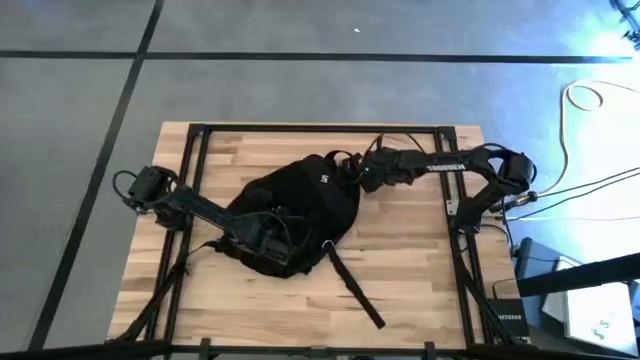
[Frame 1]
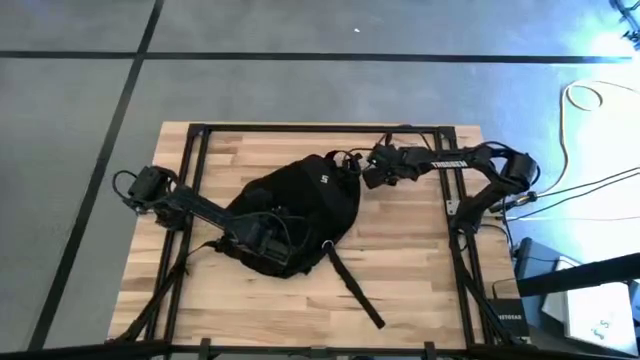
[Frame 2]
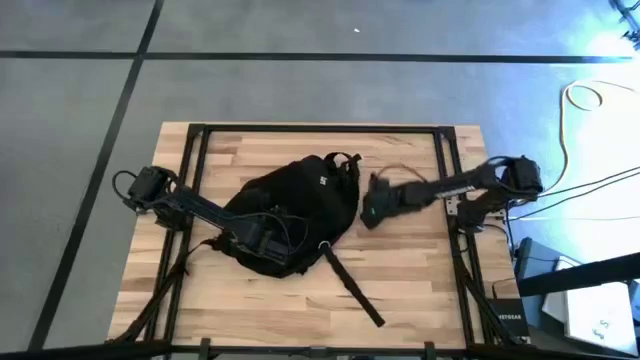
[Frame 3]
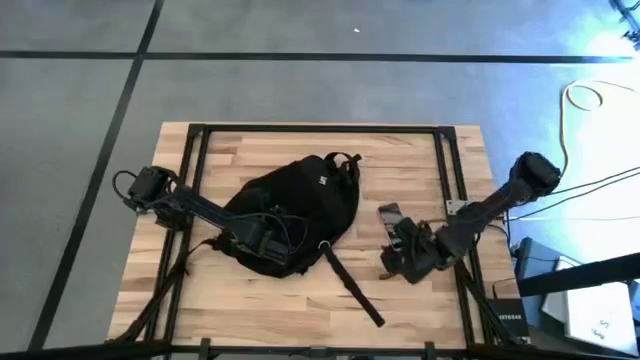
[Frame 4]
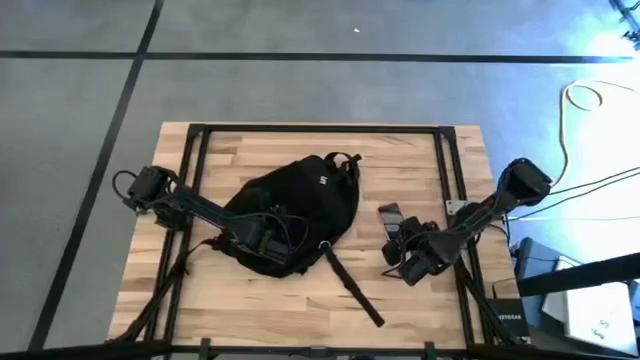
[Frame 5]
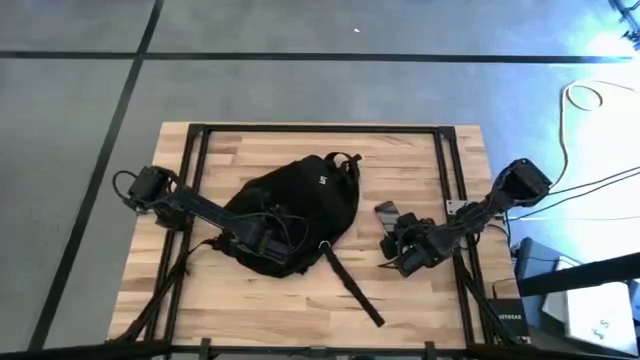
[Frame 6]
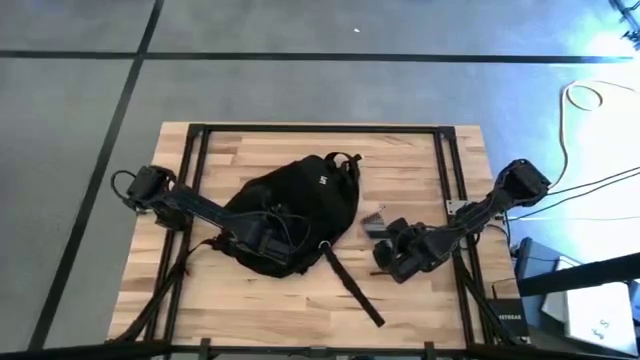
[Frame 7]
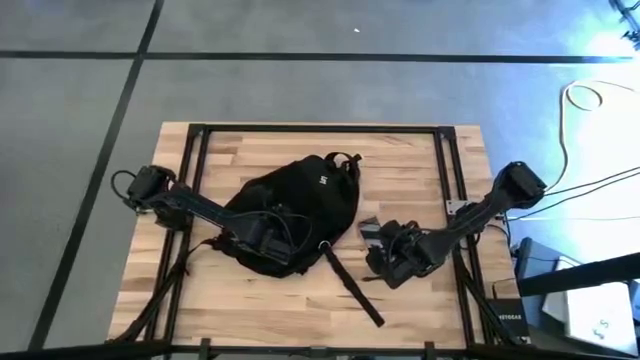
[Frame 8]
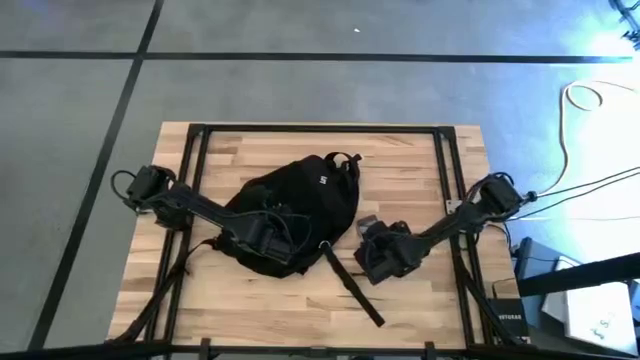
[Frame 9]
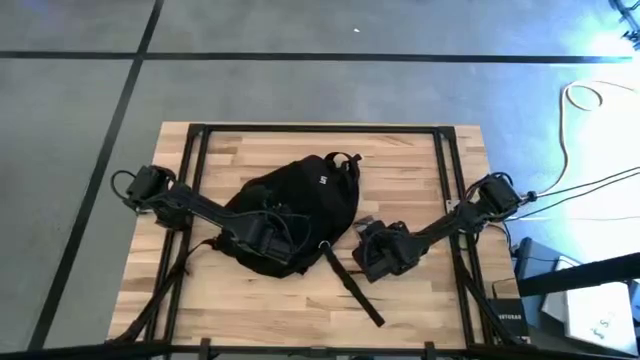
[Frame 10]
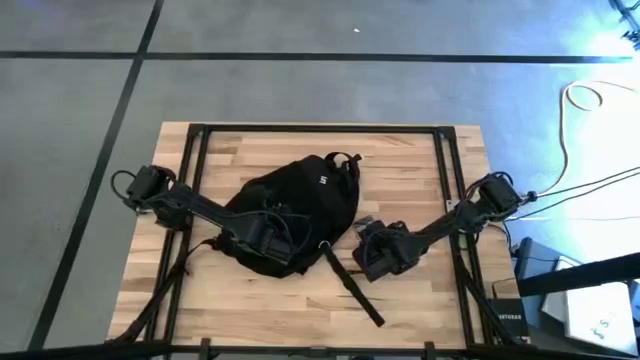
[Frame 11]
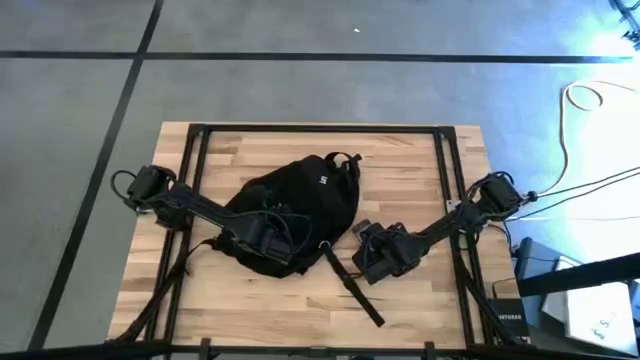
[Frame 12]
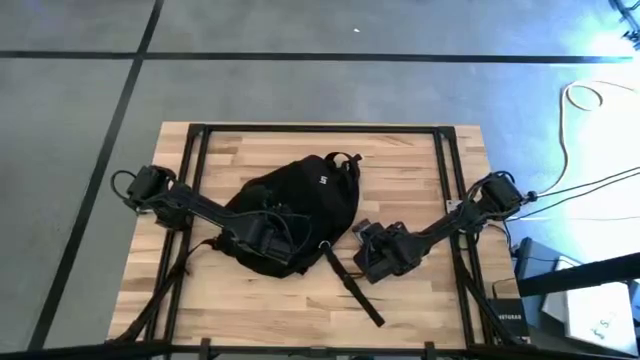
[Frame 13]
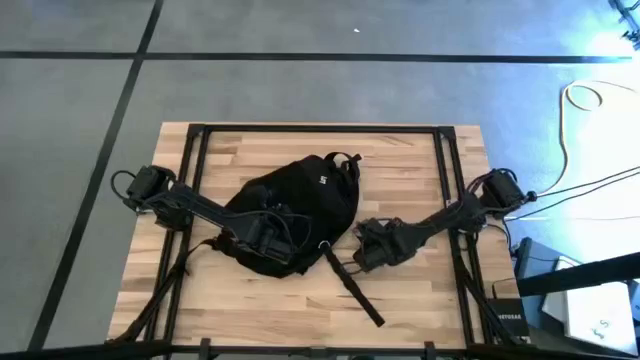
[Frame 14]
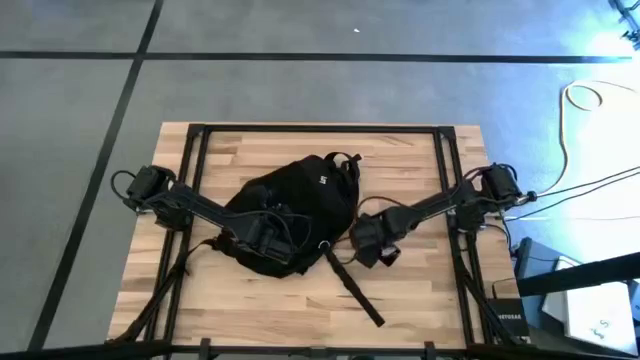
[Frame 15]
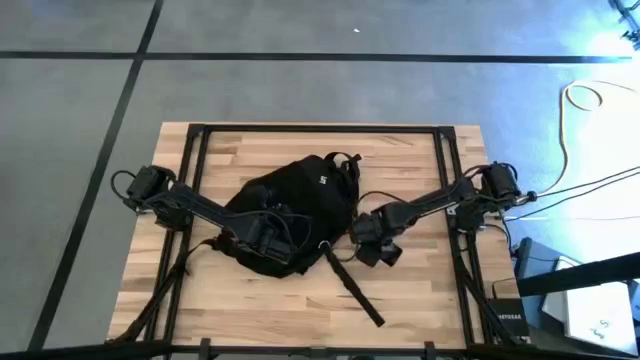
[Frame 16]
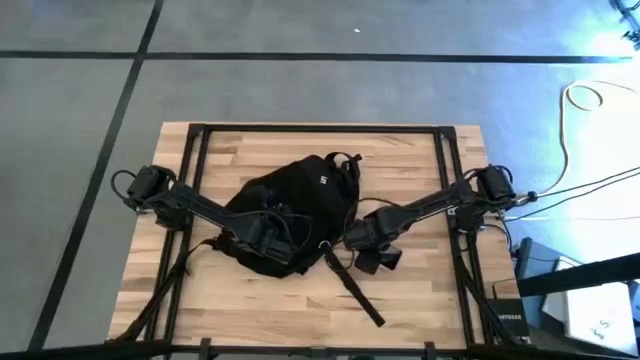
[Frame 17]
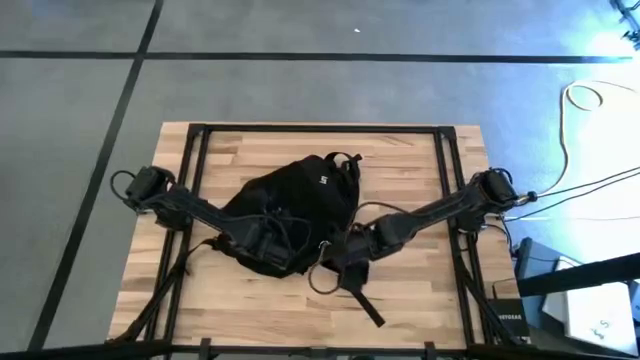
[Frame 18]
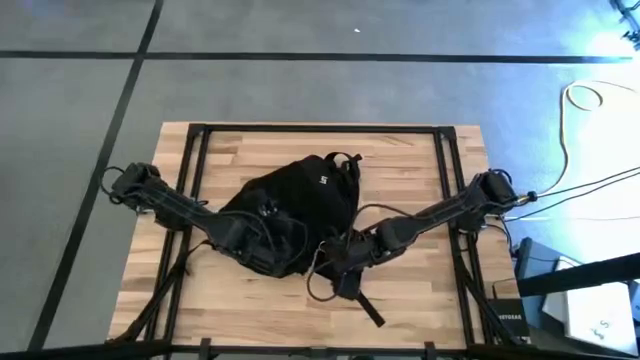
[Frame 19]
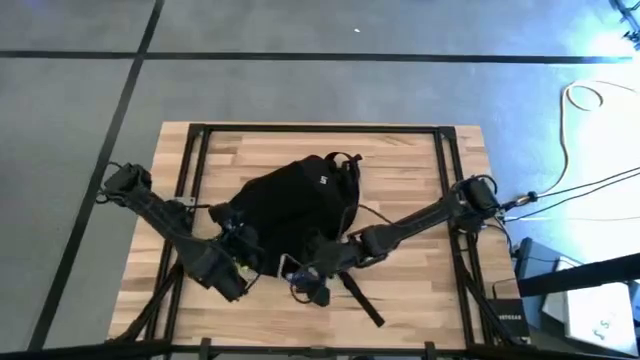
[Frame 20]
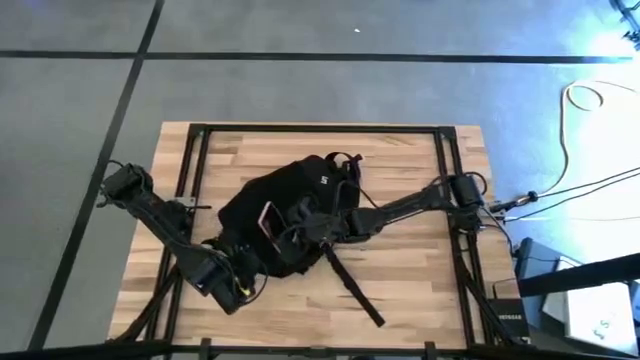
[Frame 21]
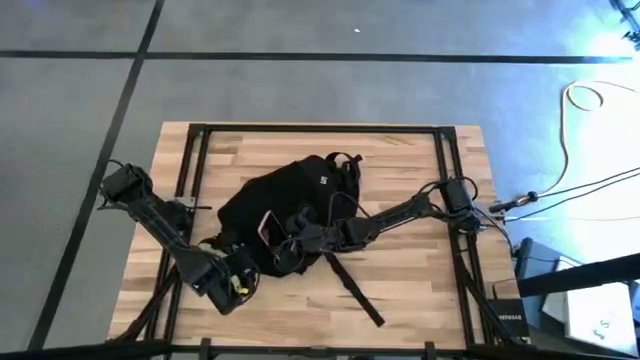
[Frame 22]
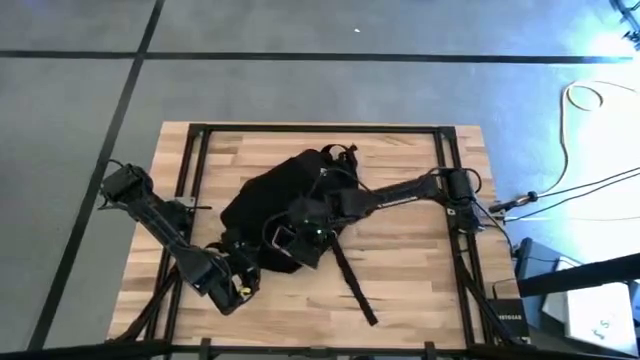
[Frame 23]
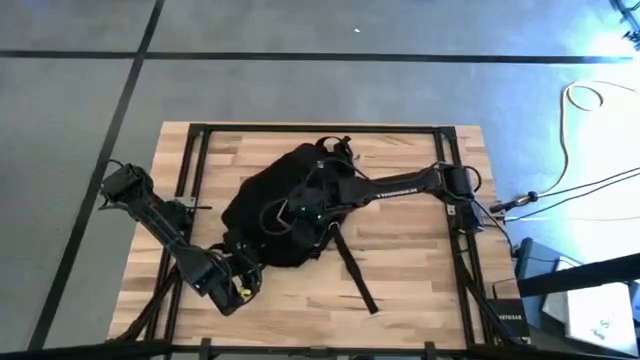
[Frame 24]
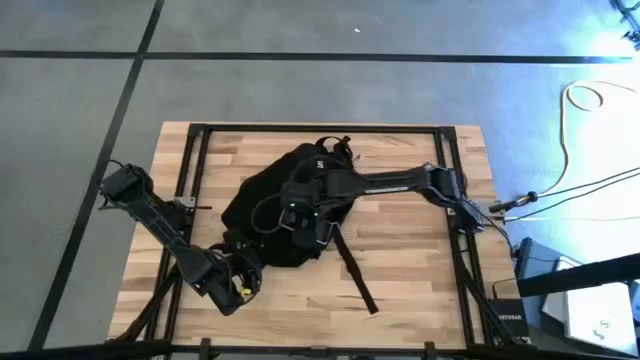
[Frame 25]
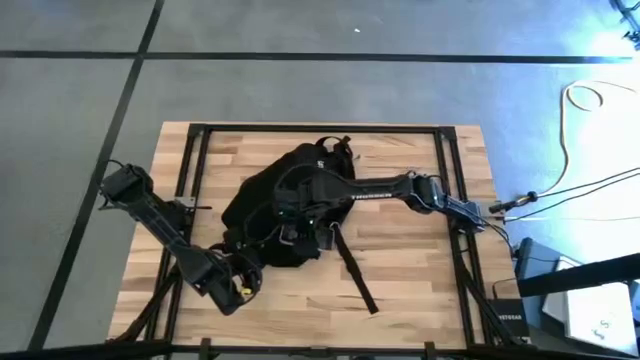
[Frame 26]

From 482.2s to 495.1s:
Task: Unpack backpack
Put the pink cellphone into the black bag
